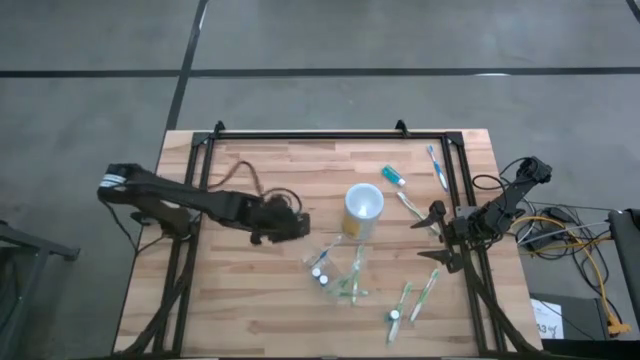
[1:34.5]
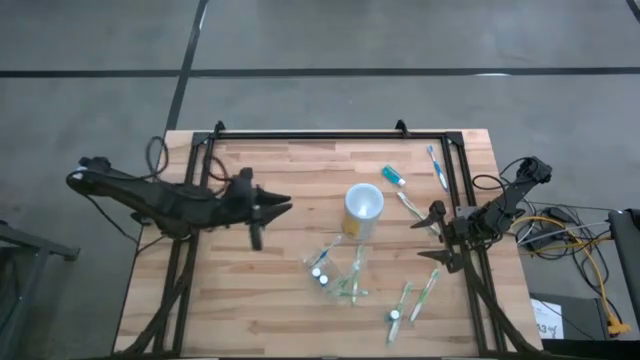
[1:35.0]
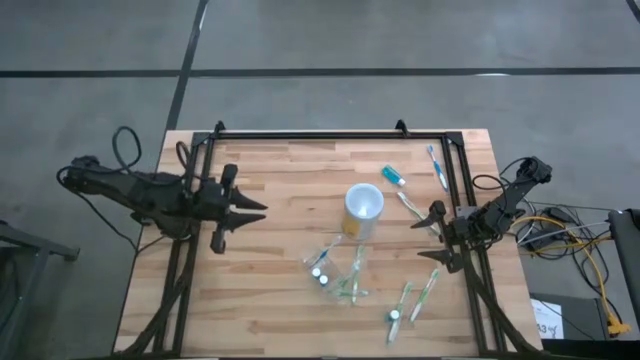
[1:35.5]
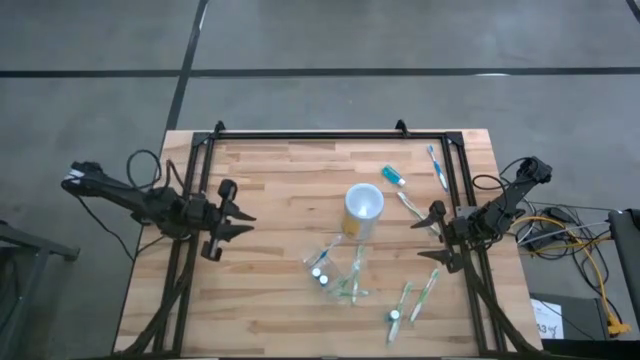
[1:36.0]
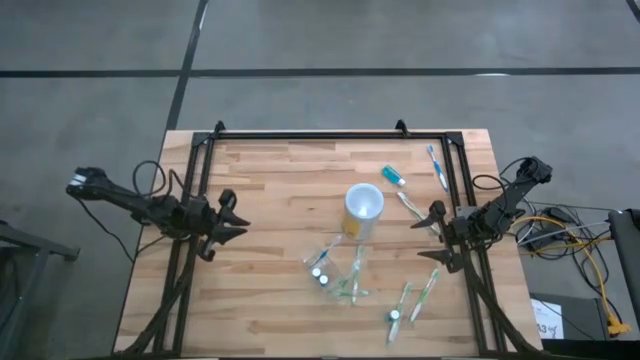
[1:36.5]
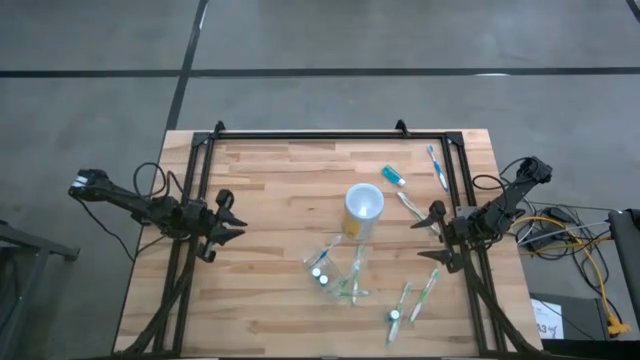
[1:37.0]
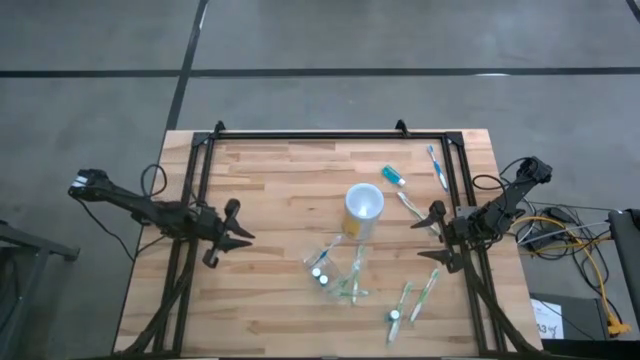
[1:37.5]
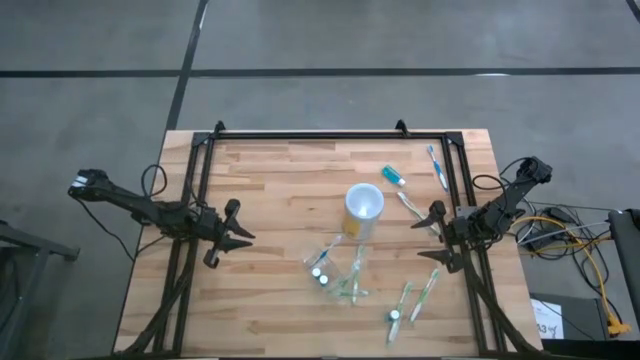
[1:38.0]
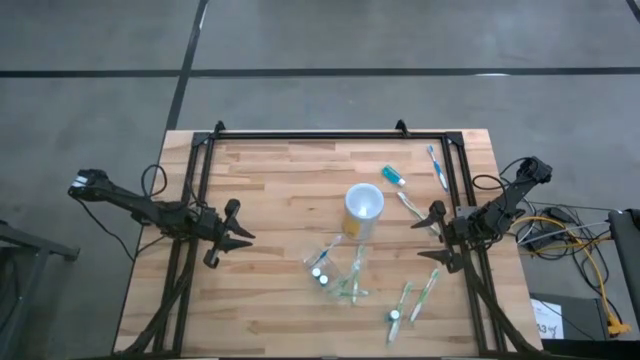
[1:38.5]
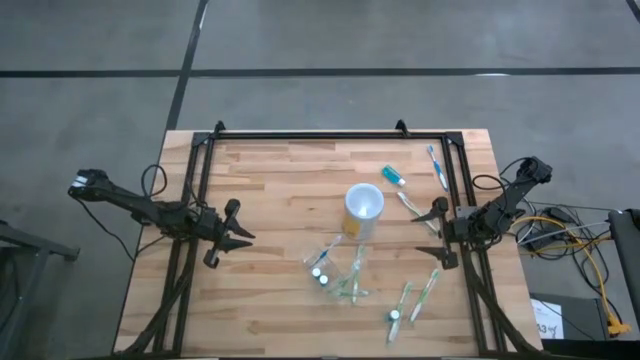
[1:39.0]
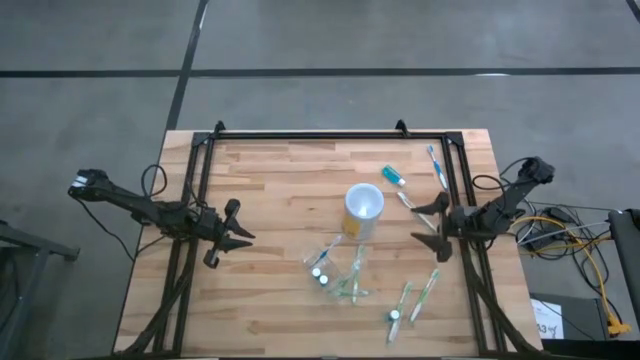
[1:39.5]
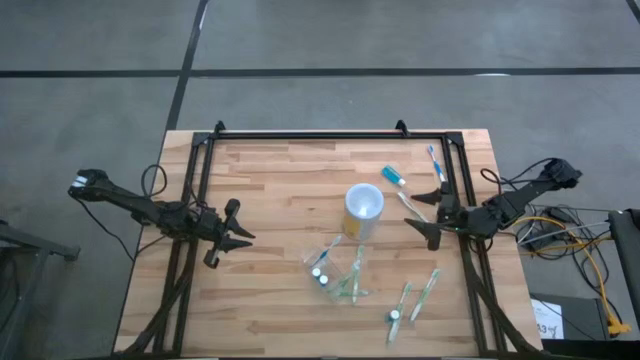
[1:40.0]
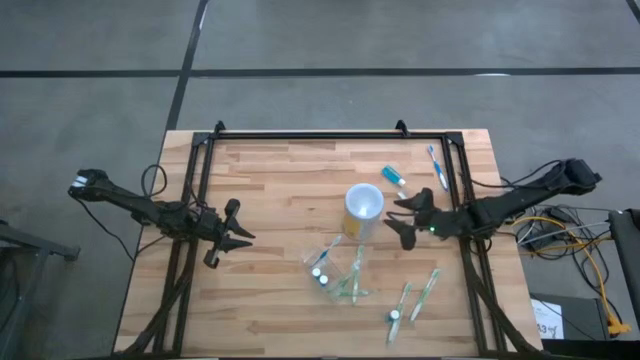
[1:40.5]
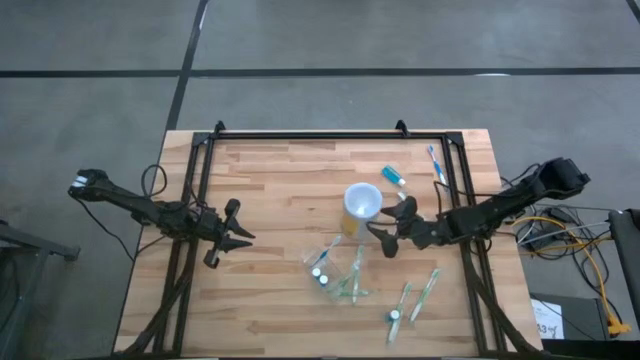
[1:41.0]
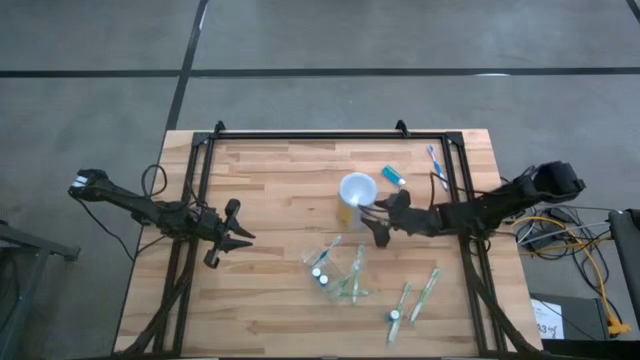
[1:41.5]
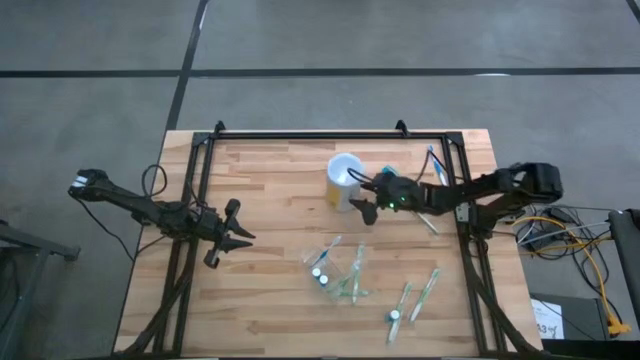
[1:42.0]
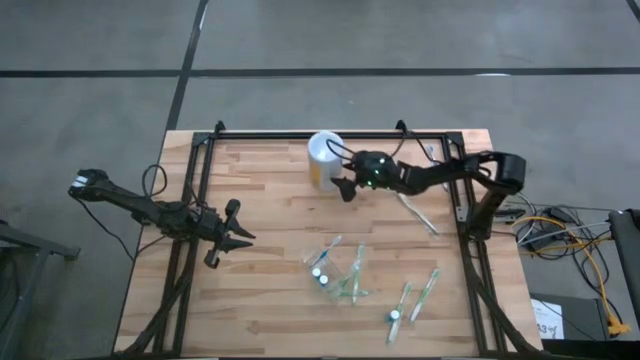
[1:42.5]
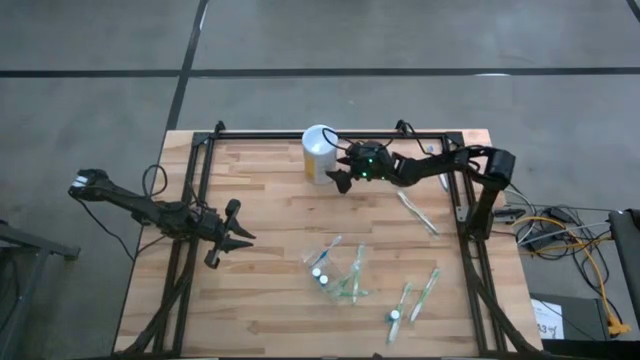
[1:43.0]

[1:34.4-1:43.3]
Task: Pick & Place toothbrushing station
Move the yellow disinfectant wipes to the top center of the table

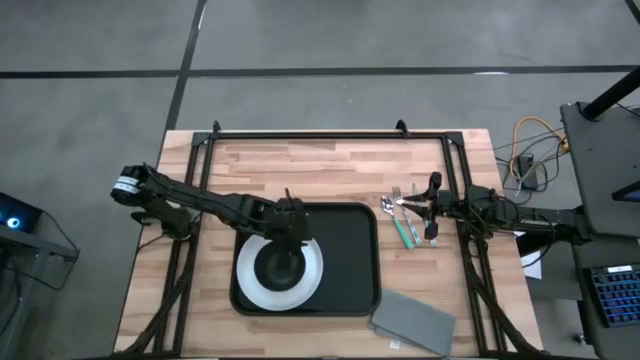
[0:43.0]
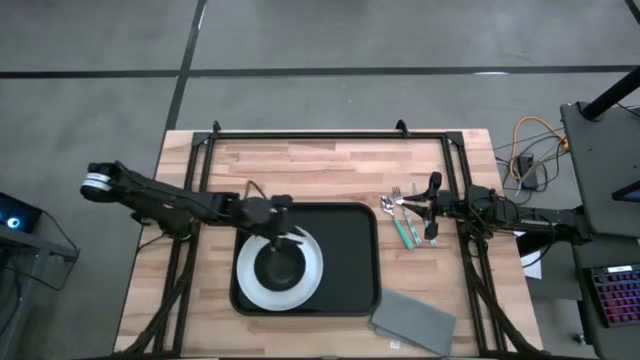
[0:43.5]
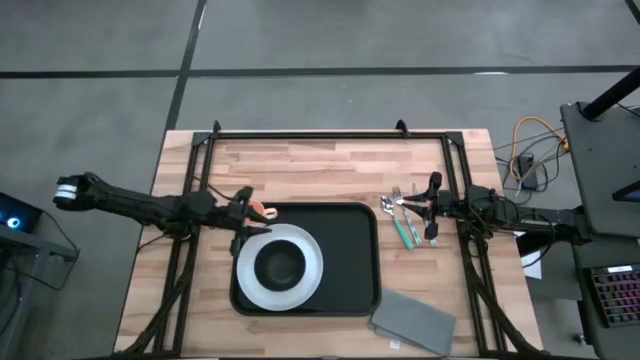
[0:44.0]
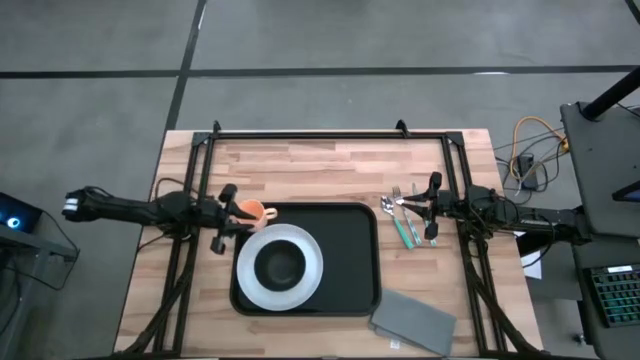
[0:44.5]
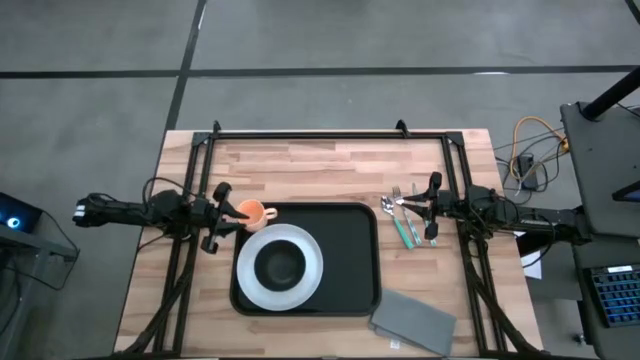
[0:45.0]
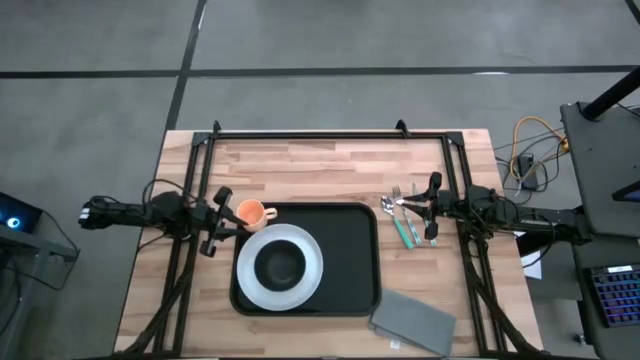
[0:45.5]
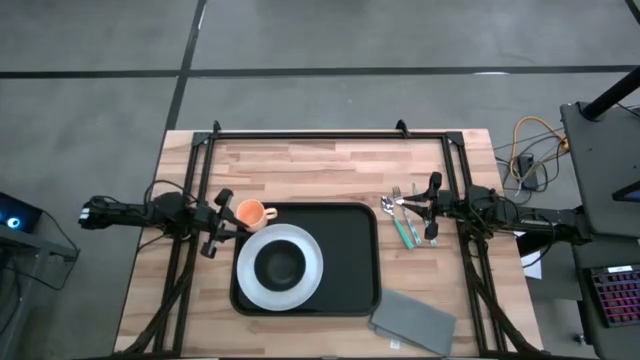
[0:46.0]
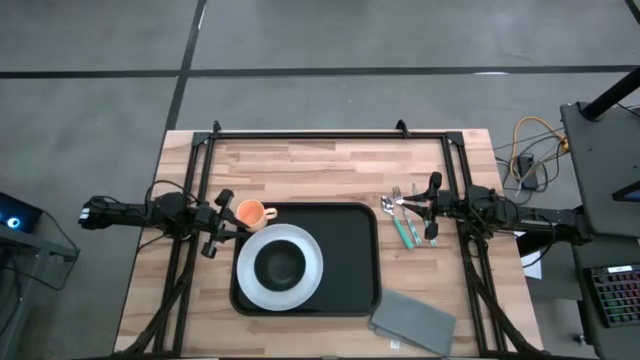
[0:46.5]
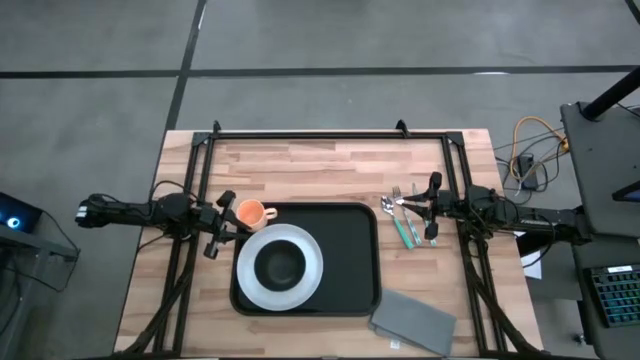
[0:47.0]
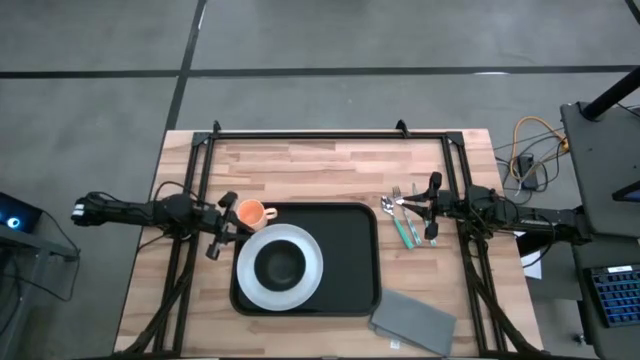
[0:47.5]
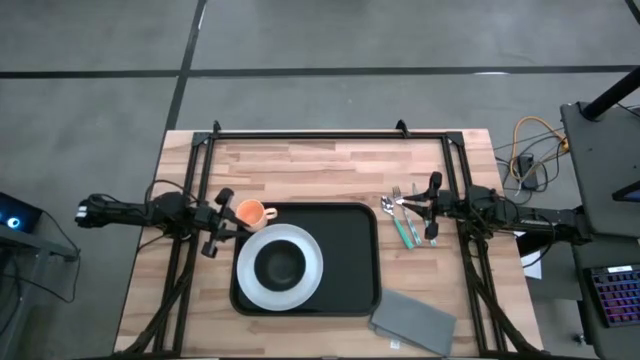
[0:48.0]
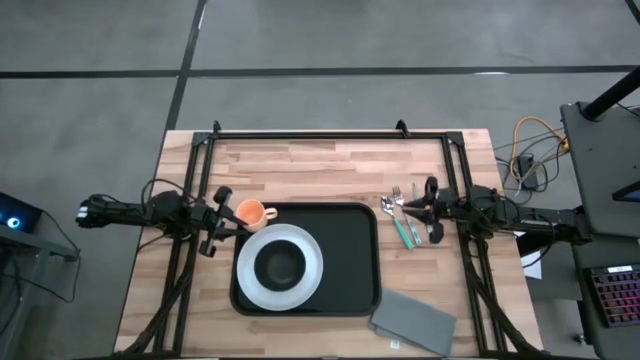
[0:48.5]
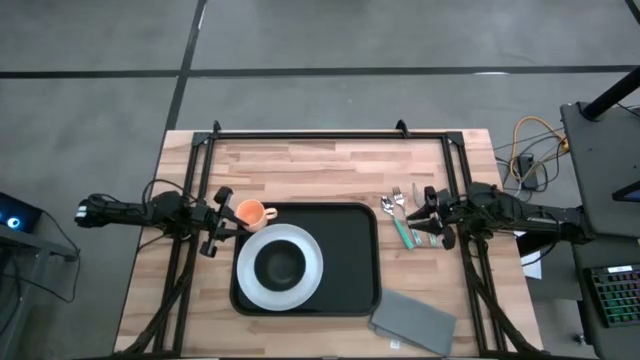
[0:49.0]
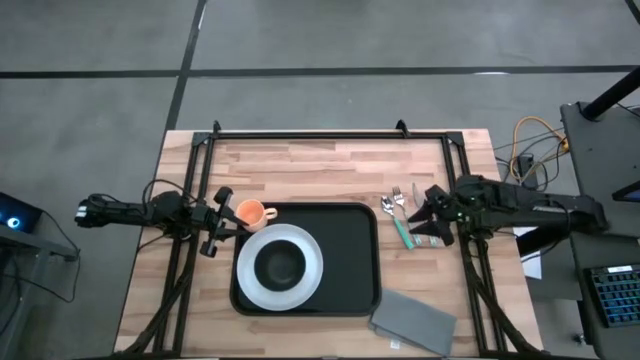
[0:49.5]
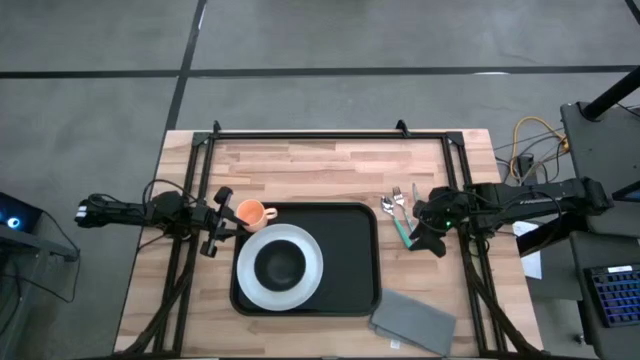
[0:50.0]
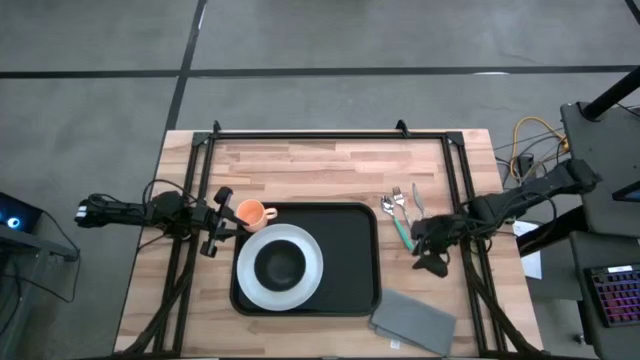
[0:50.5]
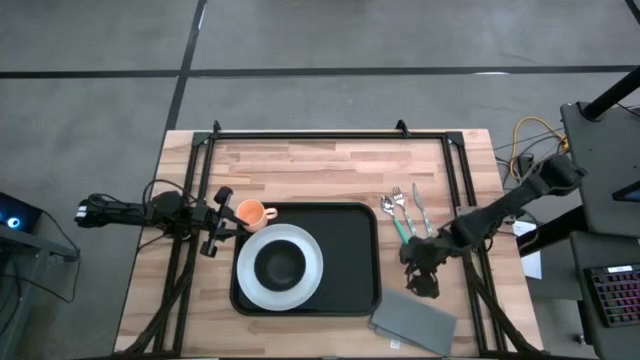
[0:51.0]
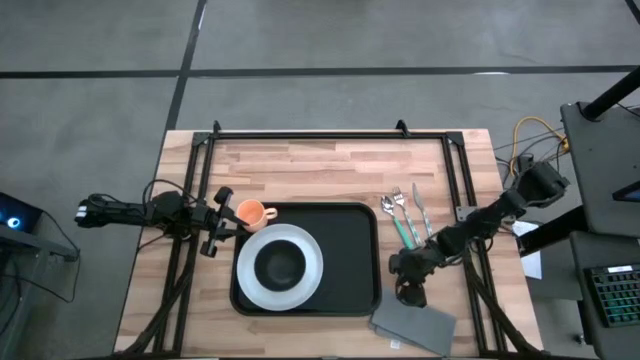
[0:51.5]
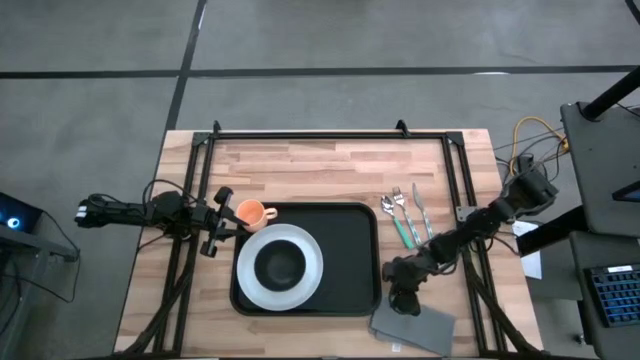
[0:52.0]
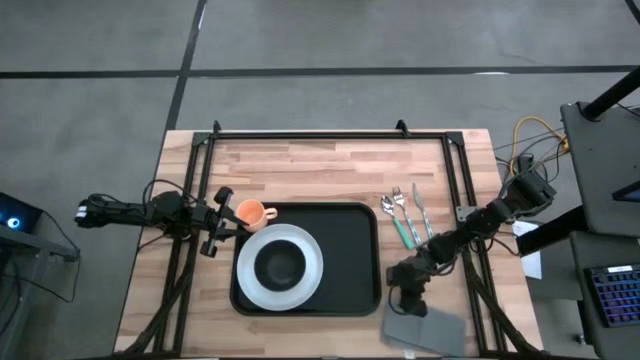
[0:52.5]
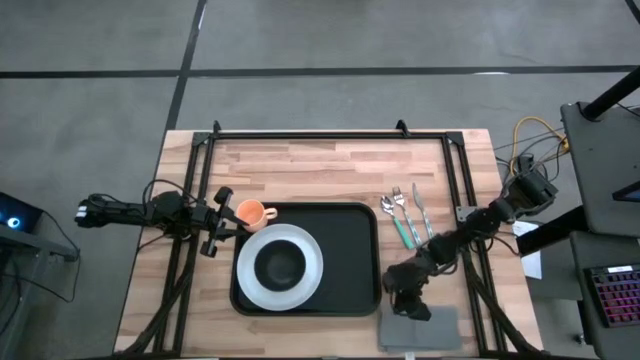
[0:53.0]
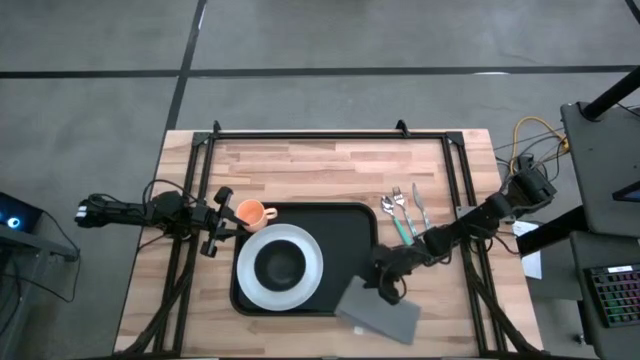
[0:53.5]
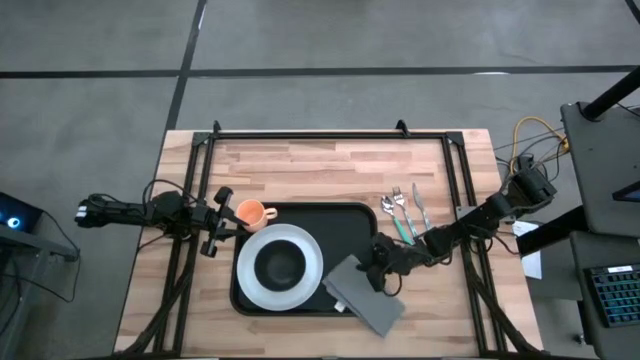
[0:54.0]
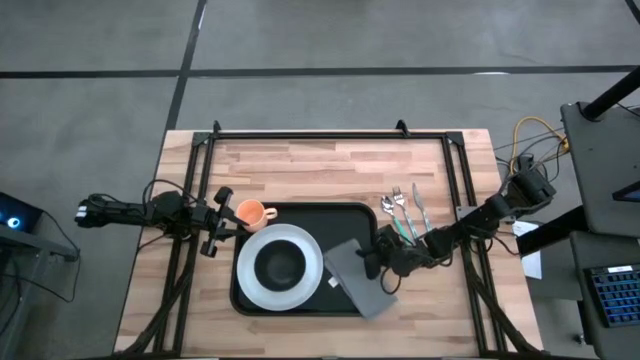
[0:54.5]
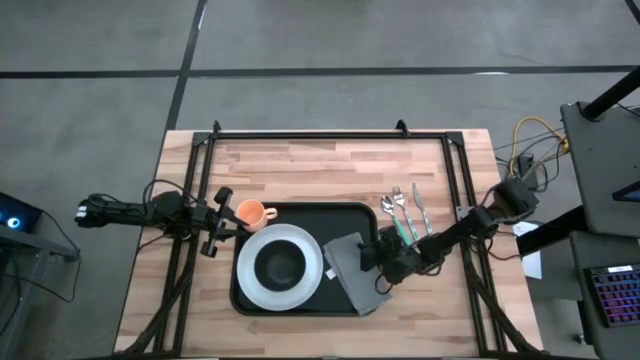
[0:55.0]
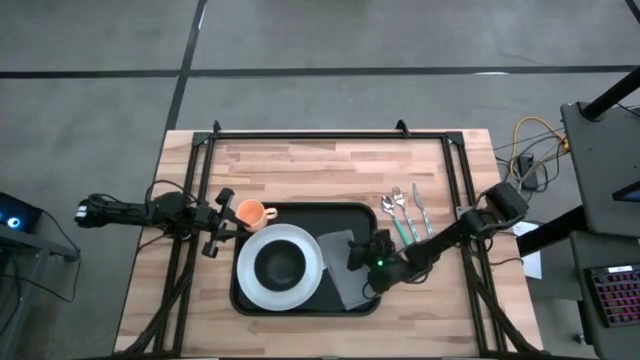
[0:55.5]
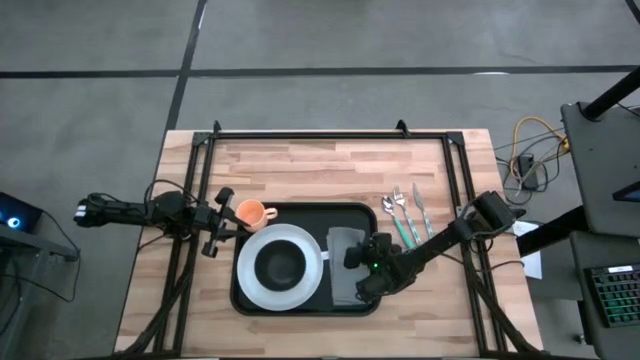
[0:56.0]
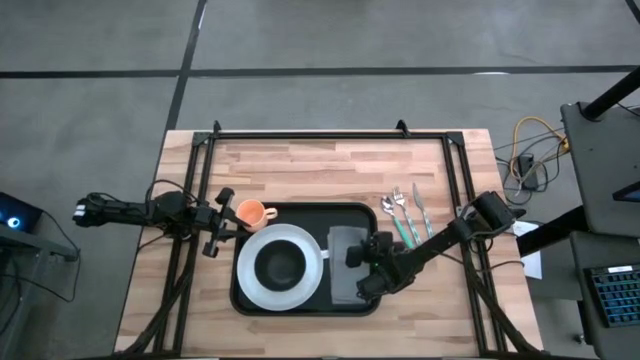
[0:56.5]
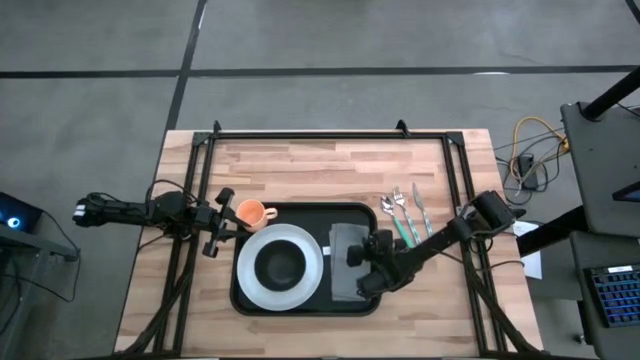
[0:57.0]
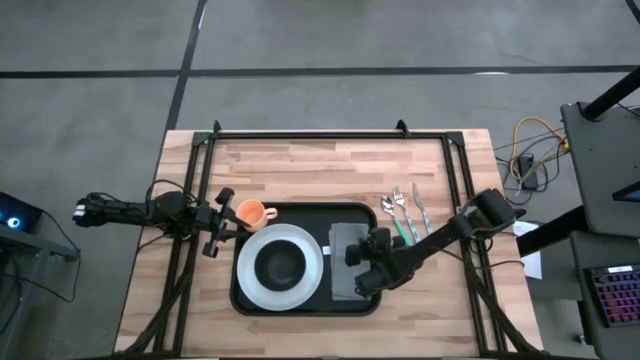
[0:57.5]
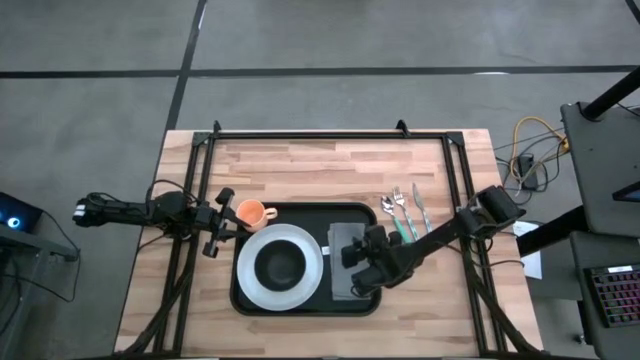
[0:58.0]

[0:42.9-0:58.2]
Task: Set up tray
Put the gray table napkin to the right of the white plate on the black tray
